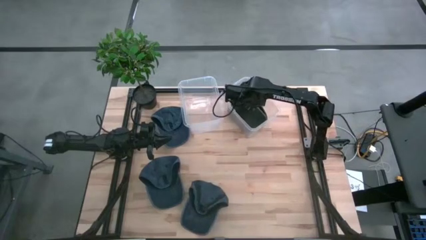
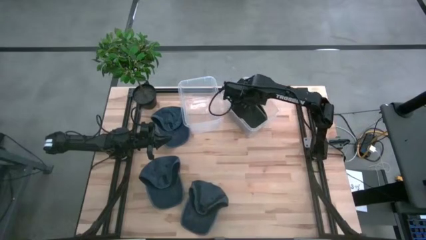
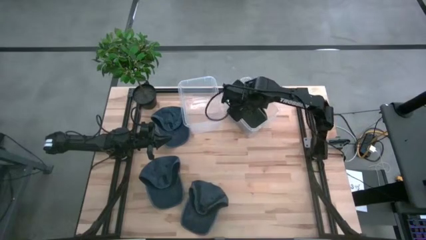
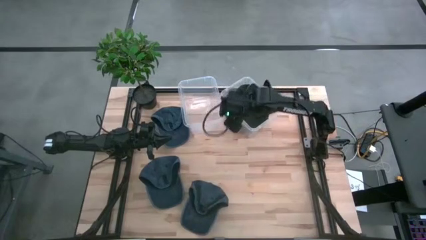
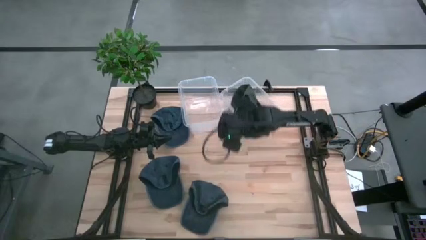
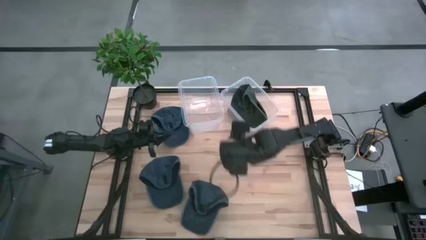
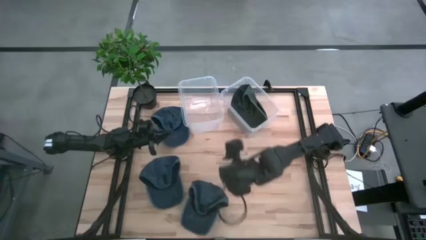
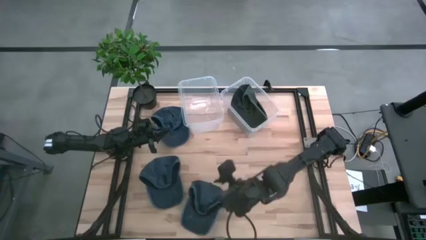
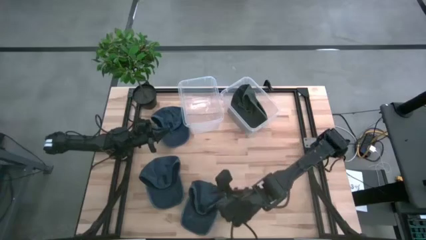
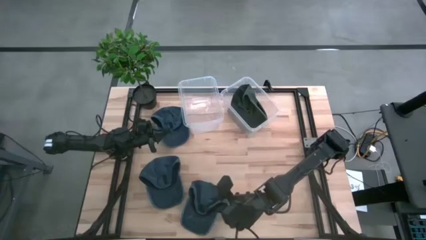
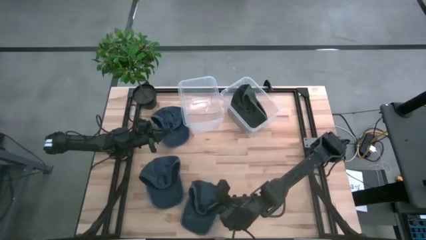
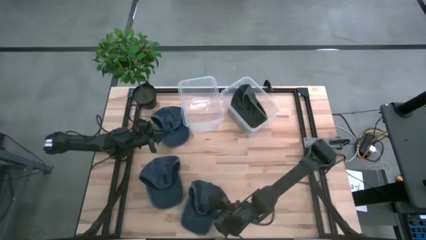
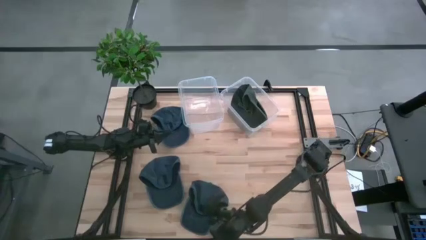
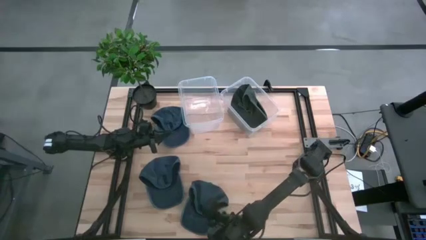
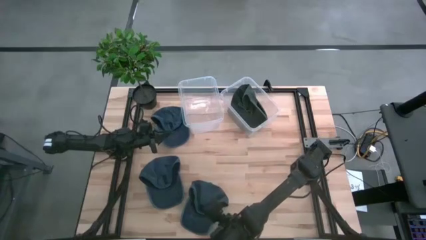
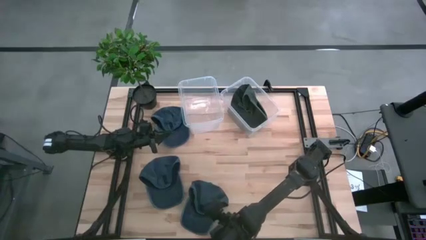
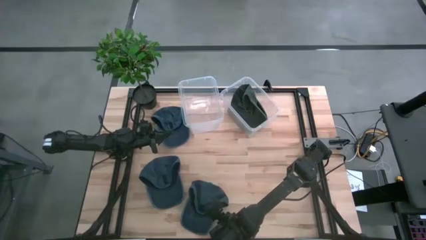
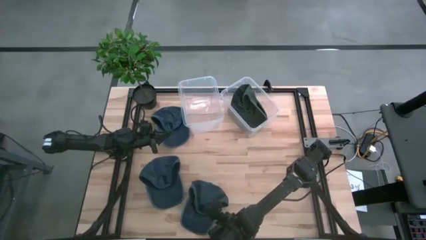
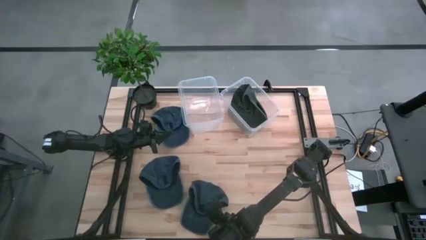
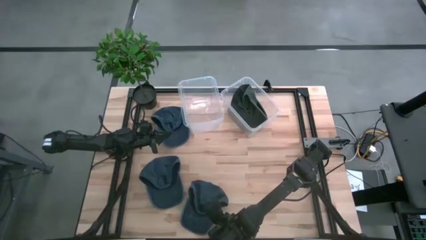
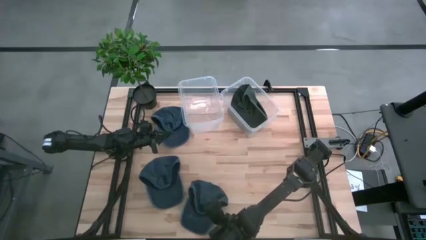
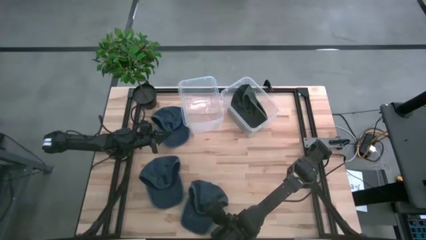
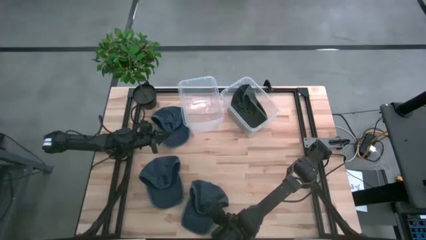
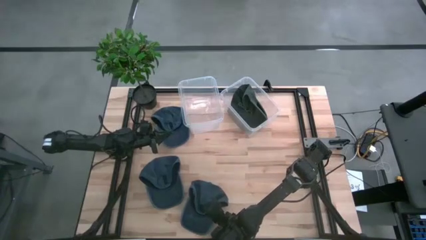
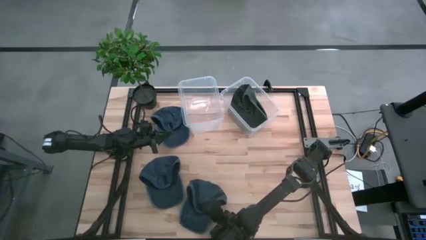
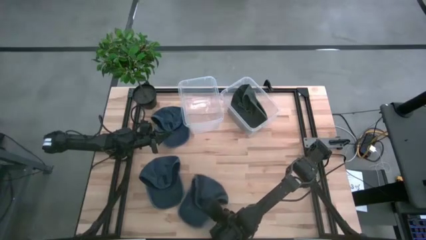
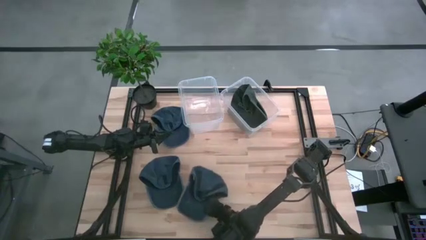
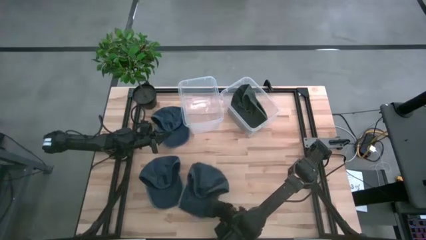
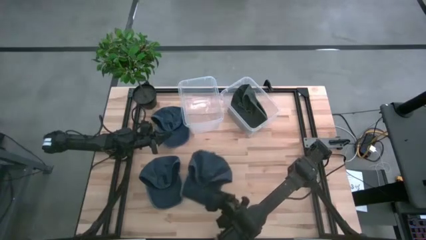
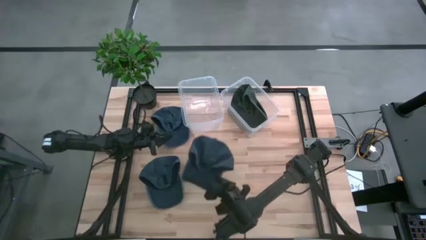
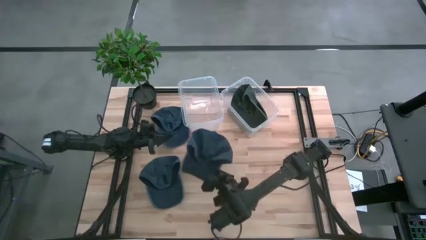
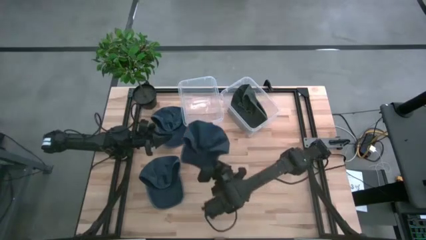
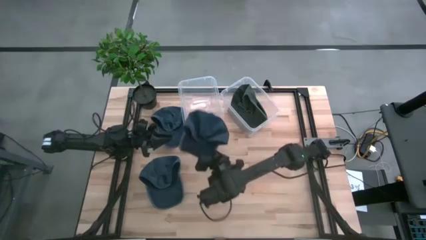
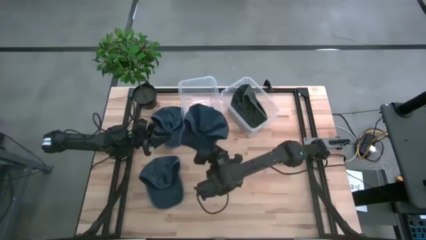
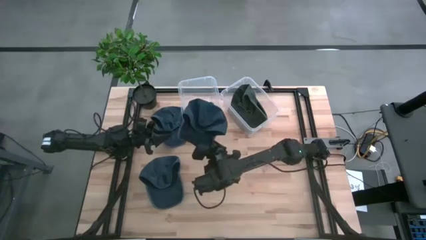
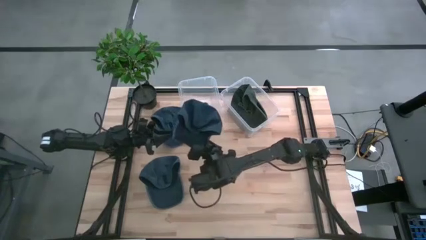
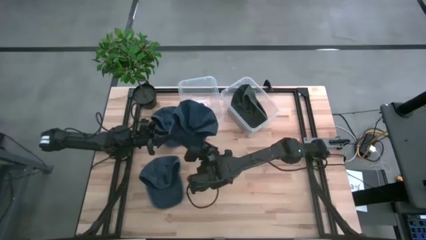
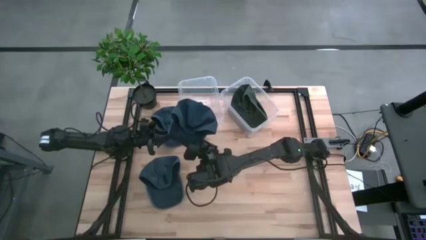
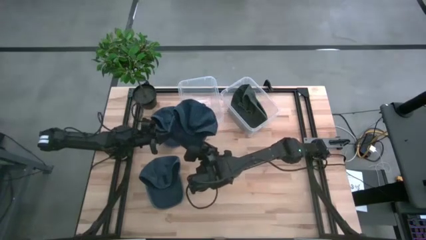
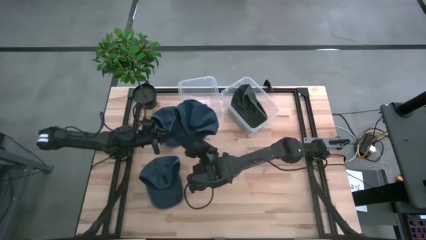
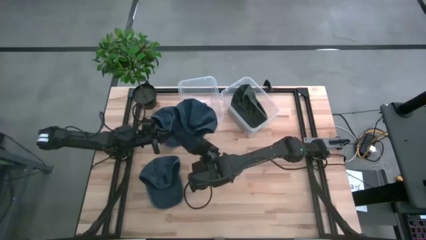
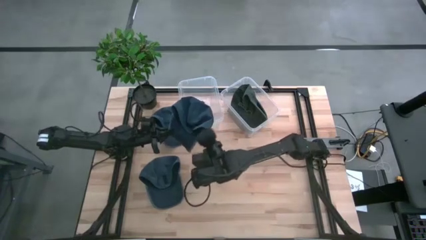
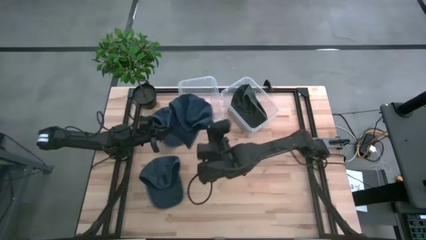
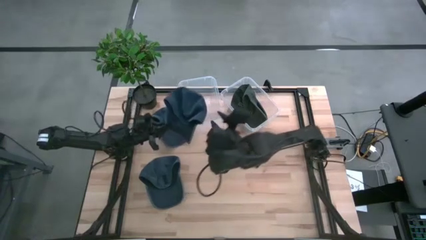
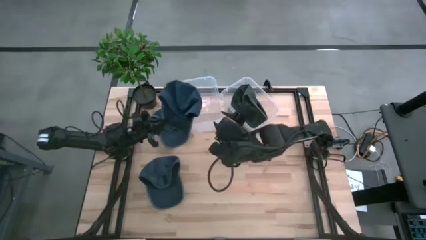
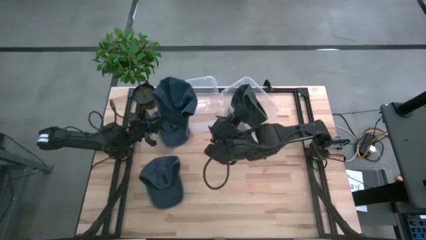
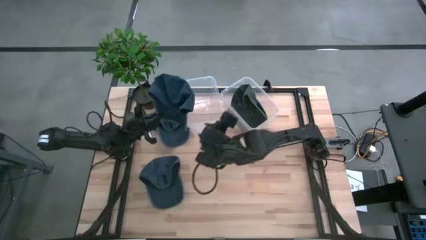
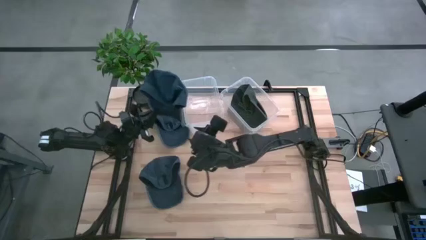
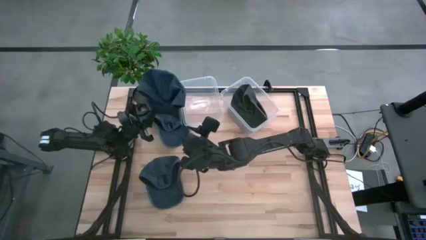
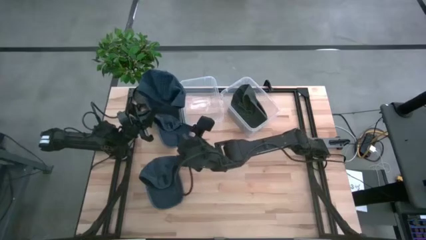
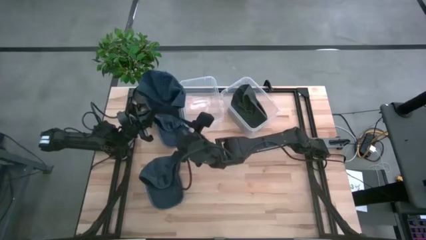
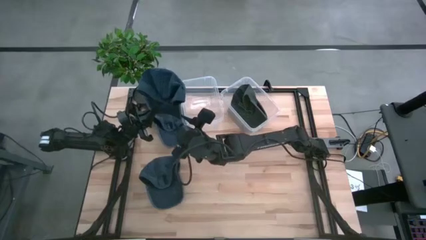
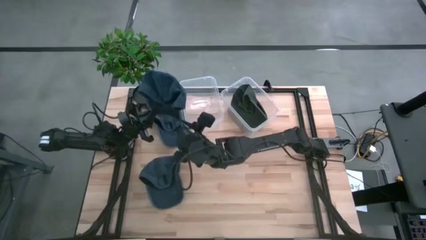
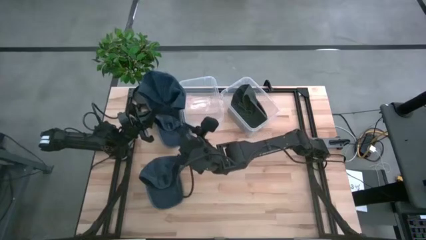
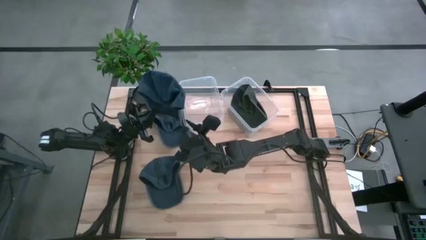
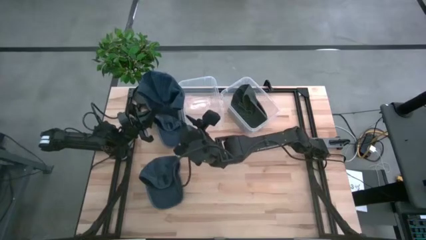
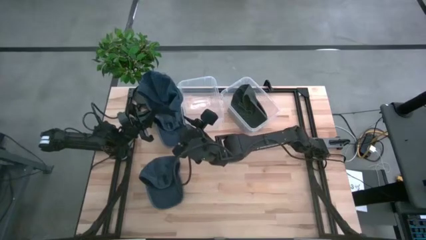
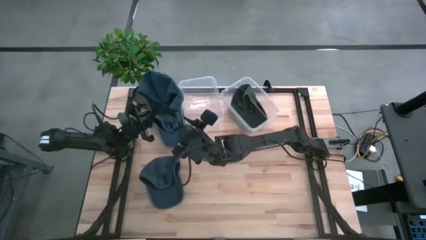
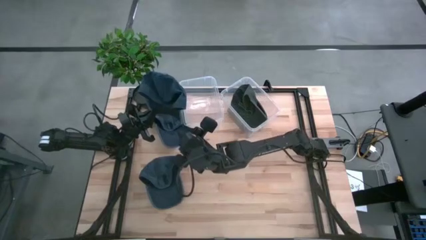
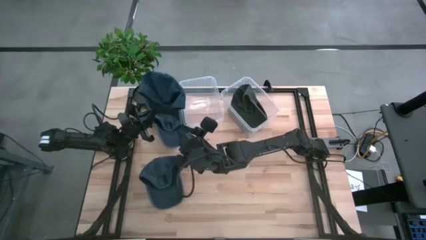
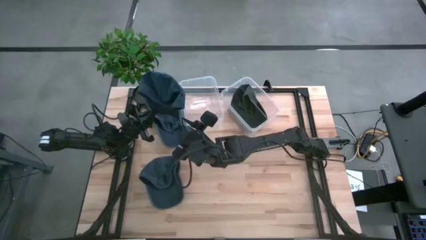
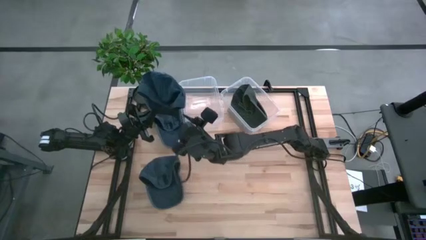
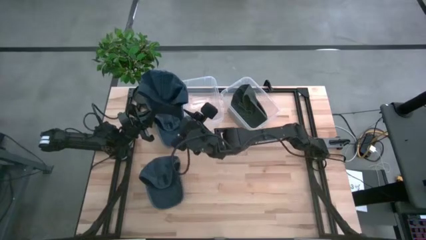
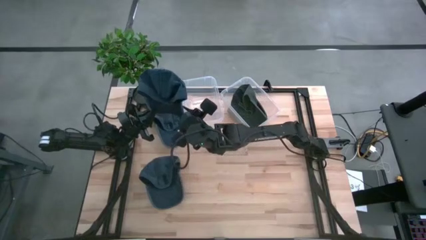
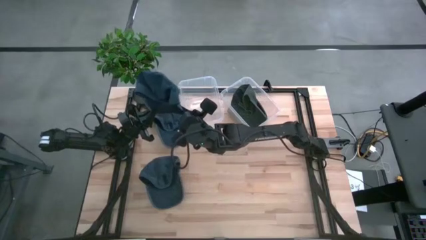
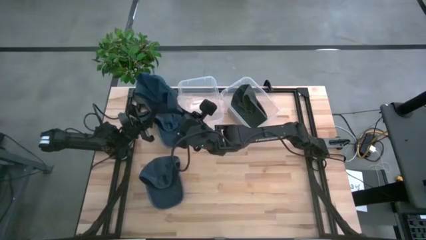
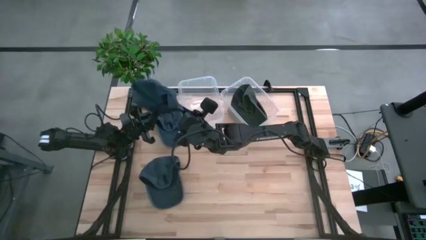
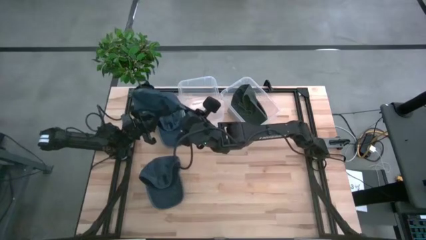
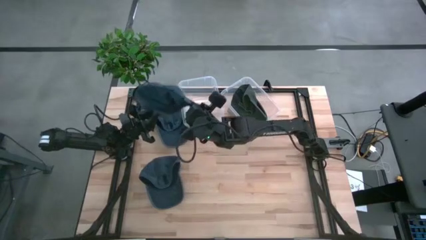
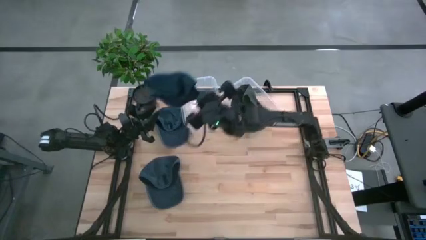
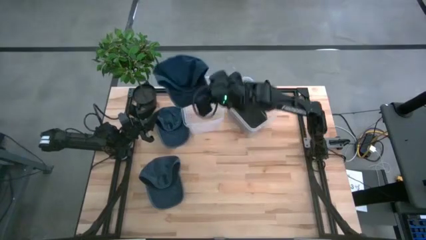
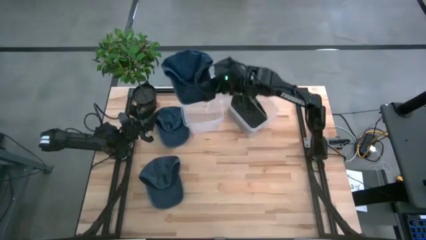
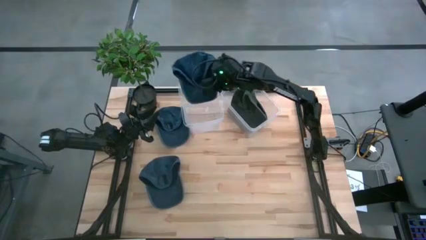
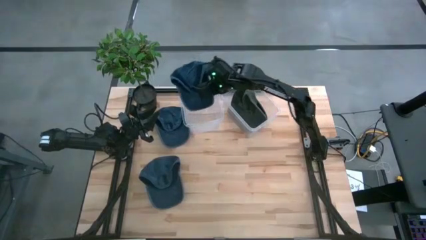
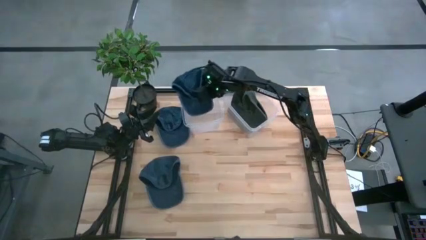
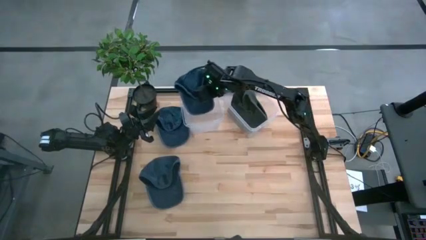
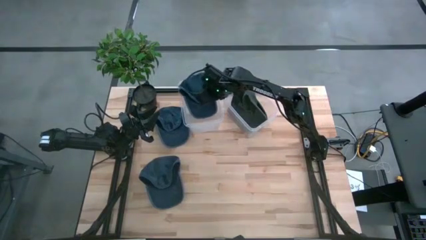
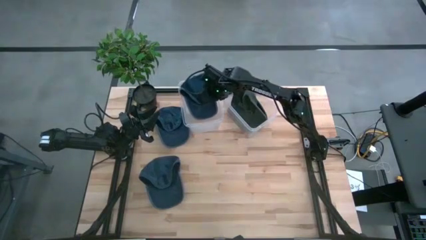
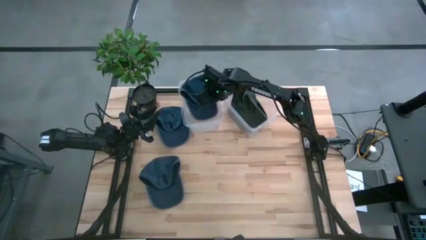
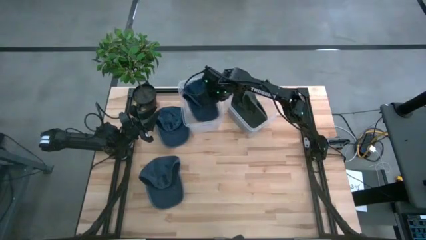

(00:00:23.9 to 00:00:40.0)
Task: Pick & Place hat
Put the bottom right blue cap into the left transparent bin

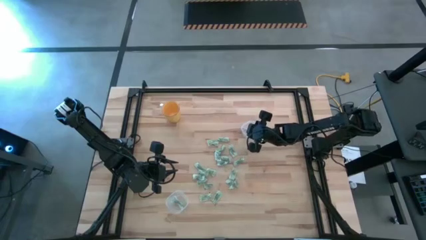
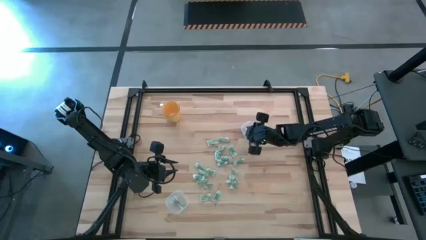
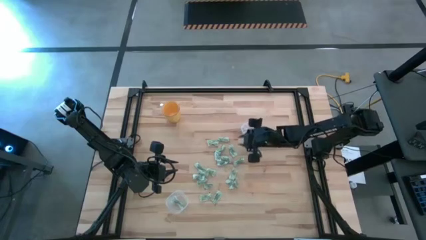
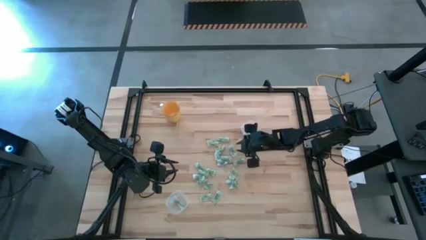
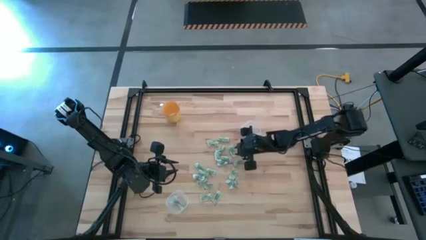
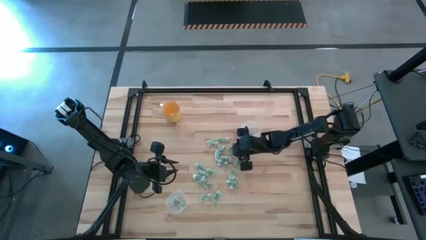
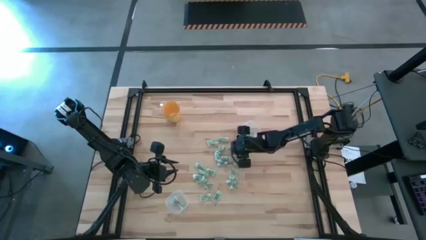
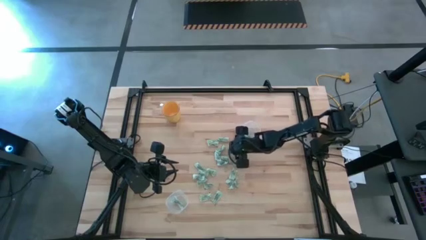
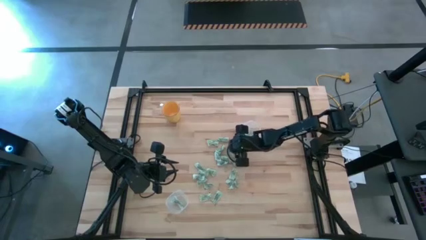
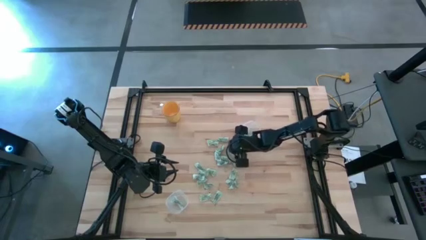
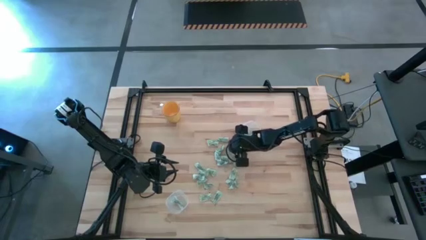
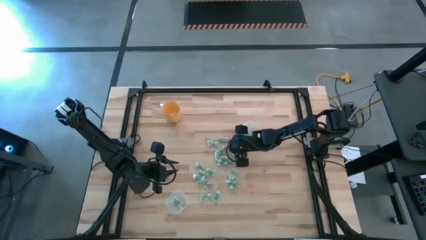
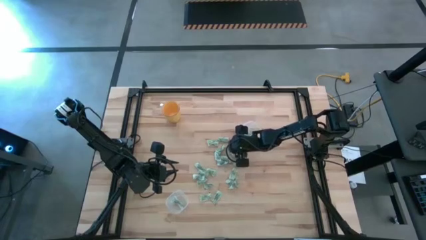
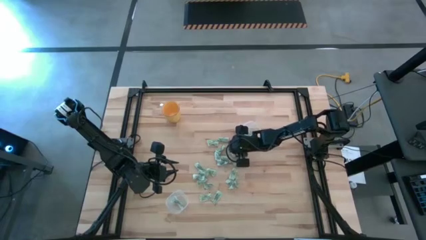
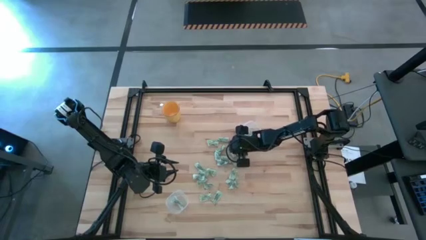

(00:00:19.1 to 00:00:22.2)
Task: Pick and place Stevia / Truvia into bins
Put the green stevia packet into the top transparent container
